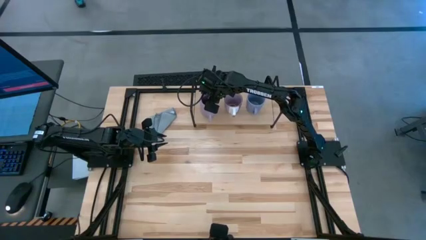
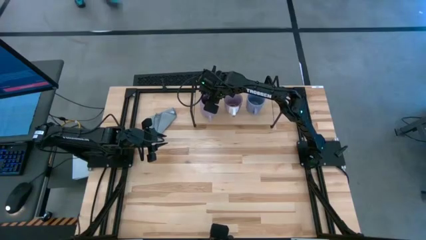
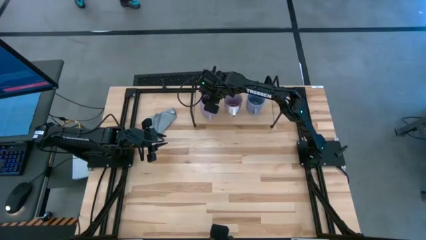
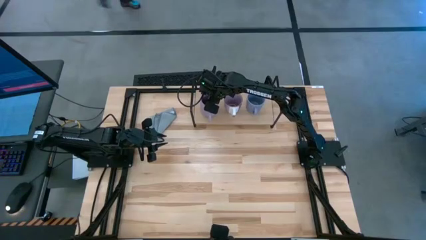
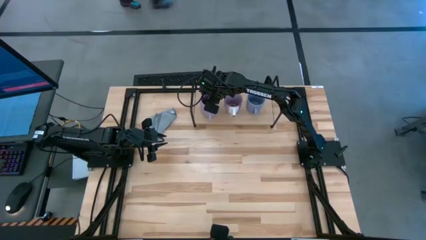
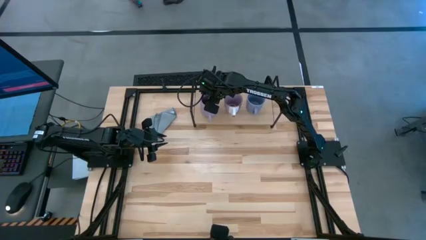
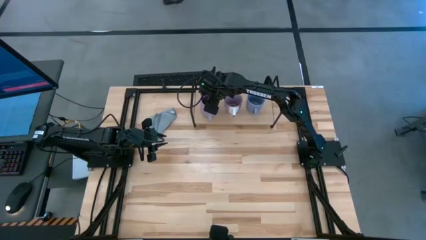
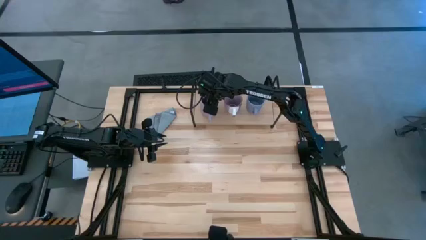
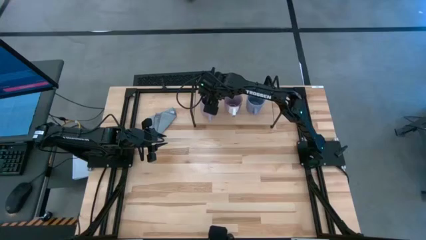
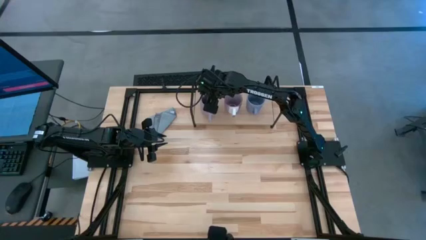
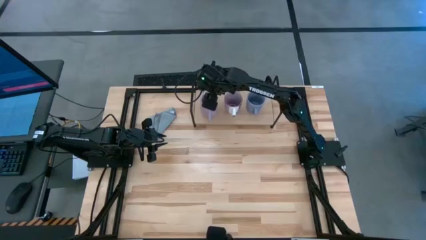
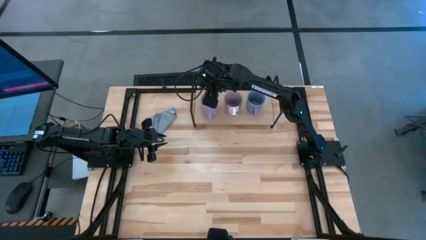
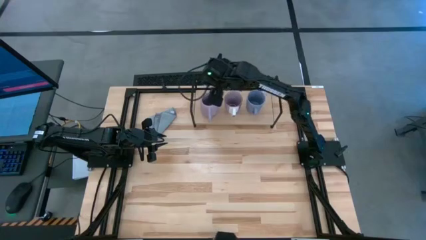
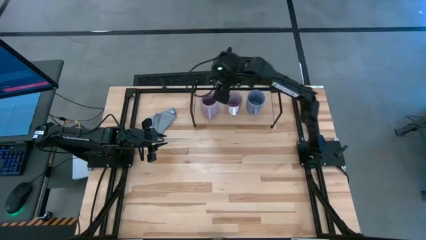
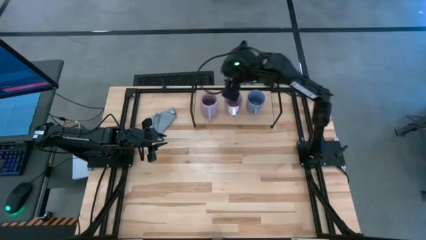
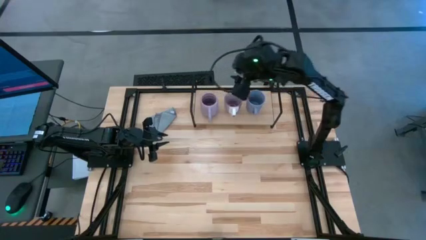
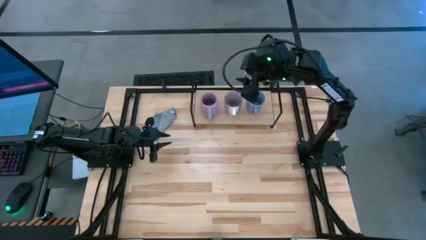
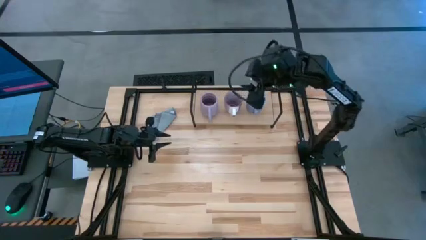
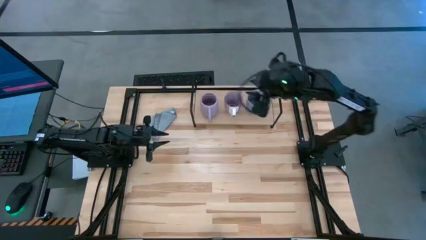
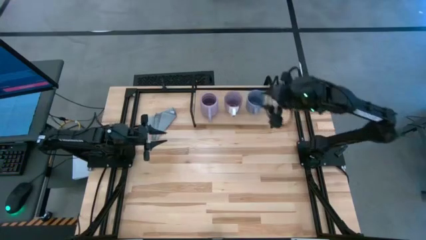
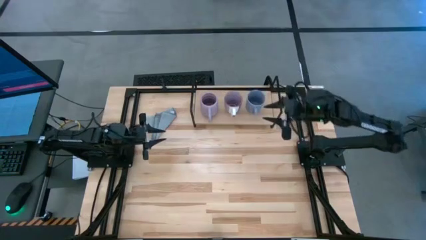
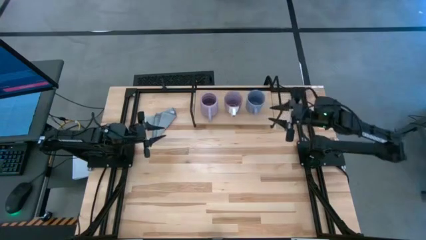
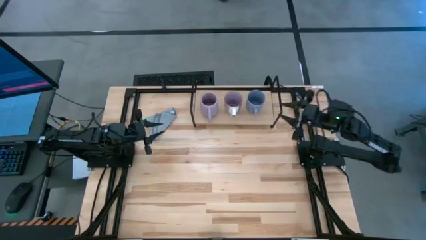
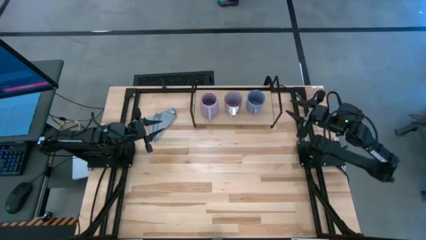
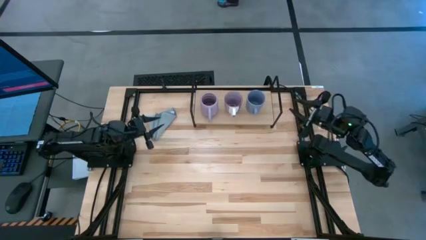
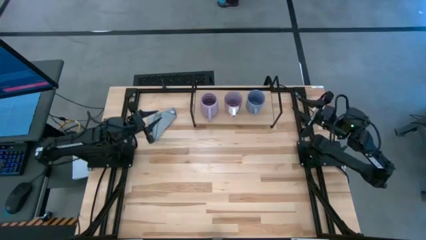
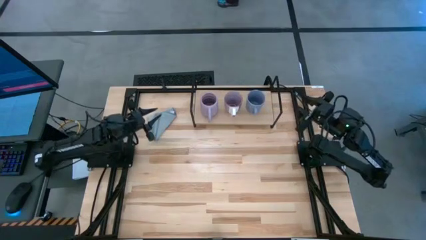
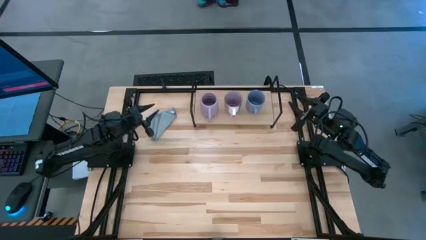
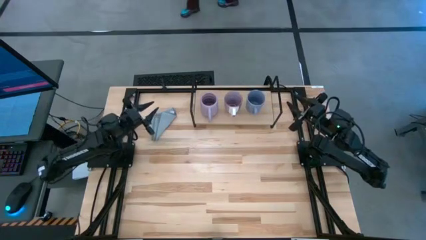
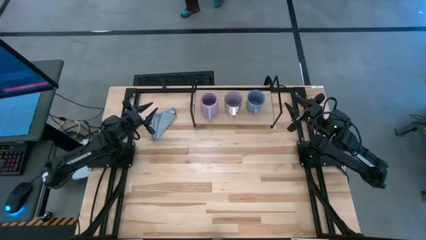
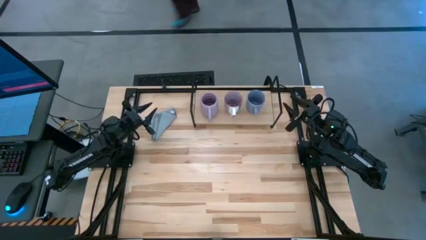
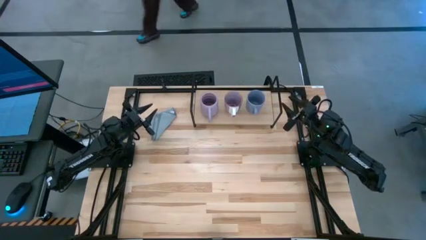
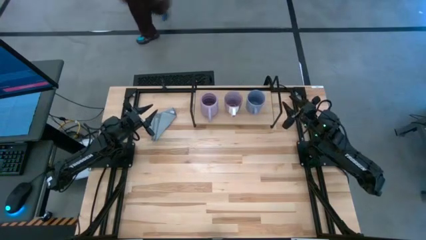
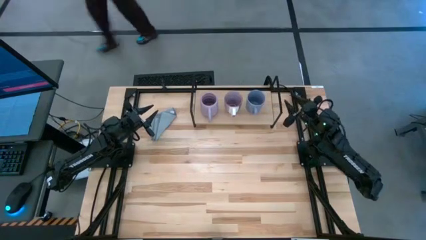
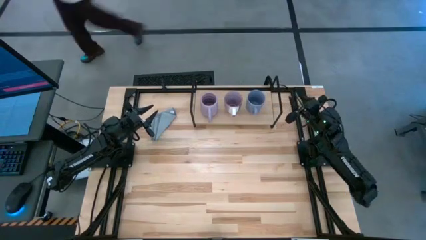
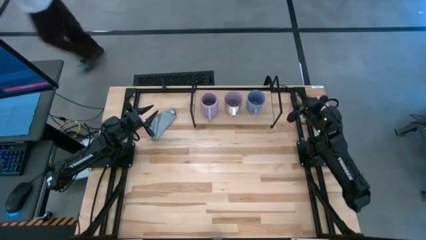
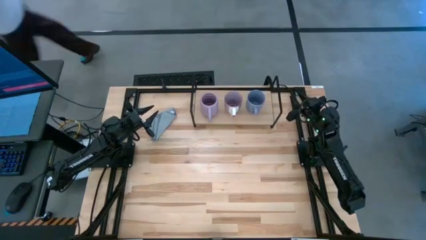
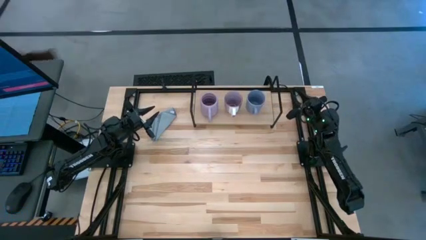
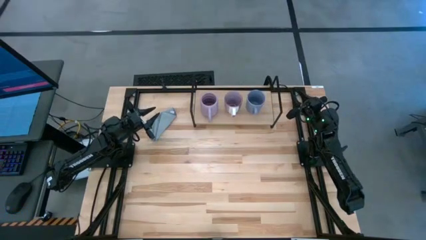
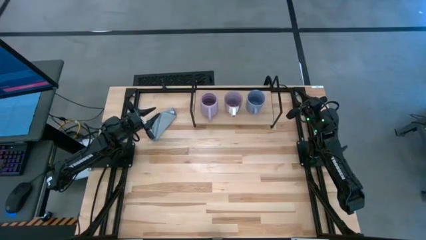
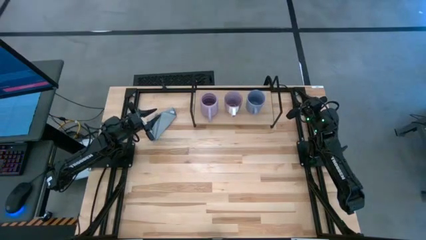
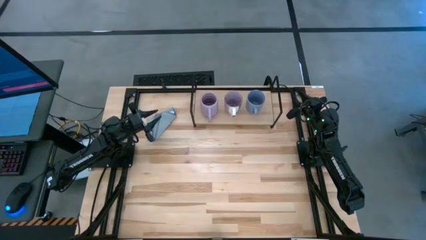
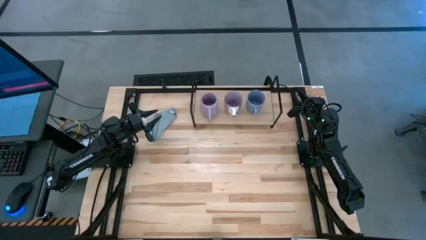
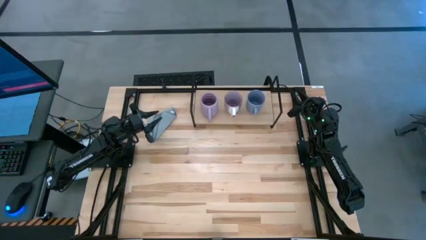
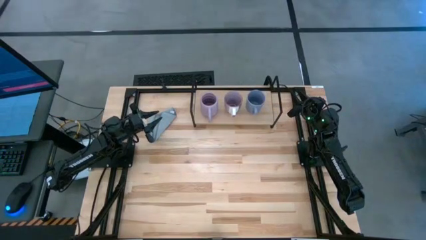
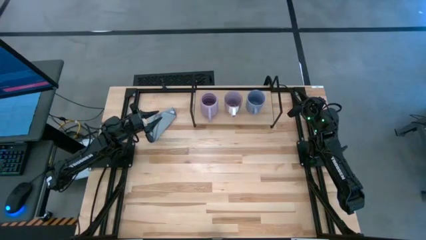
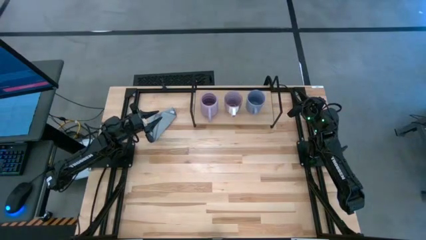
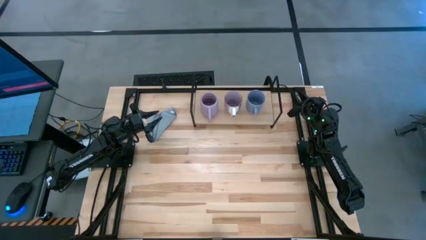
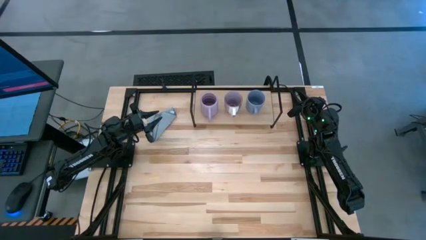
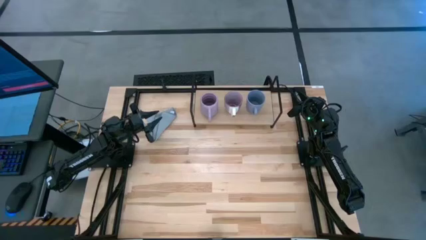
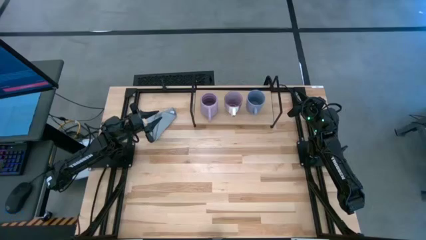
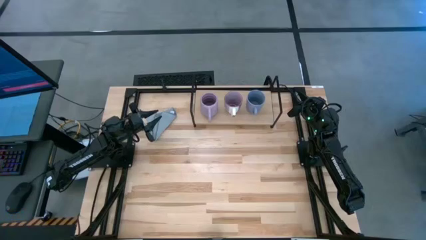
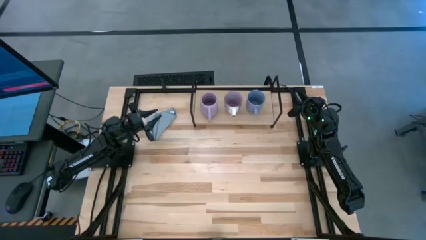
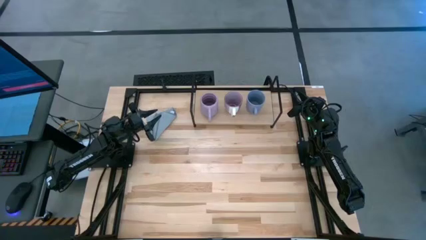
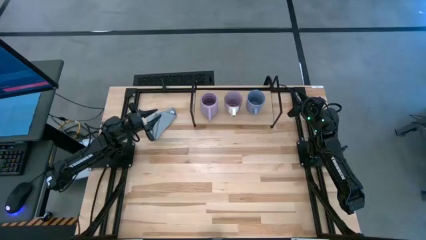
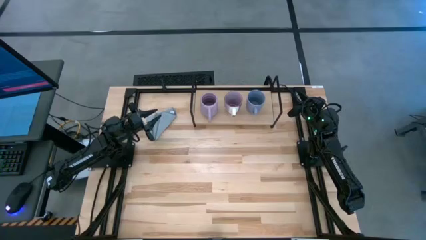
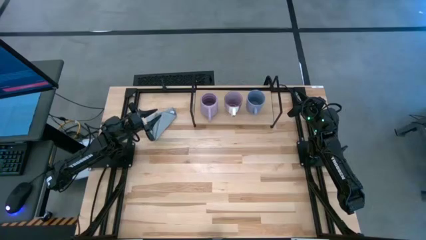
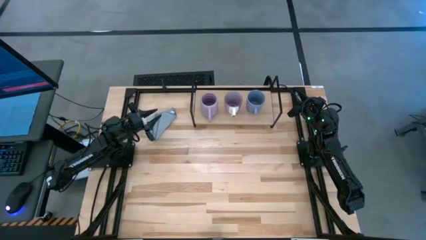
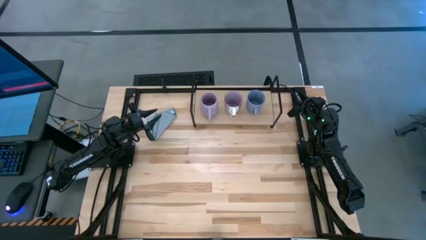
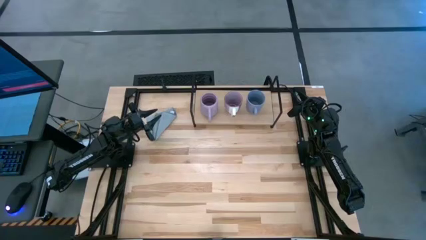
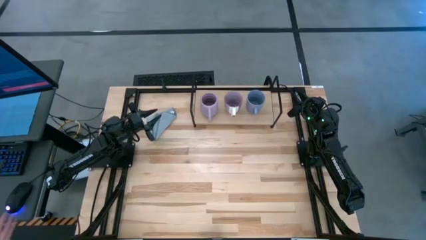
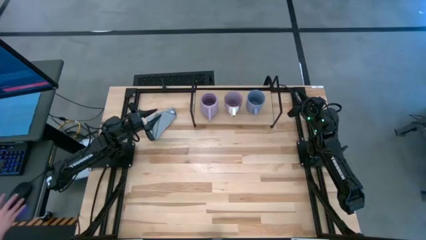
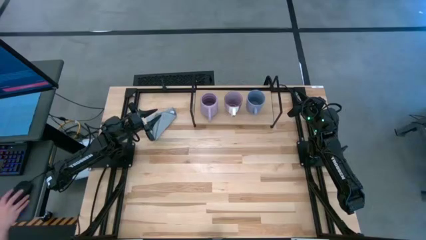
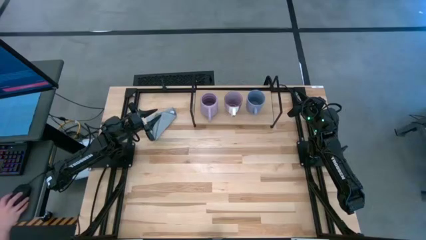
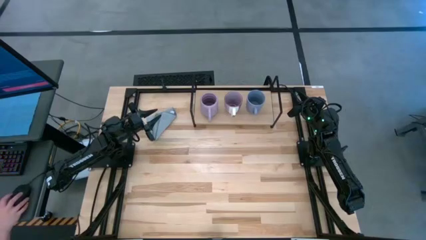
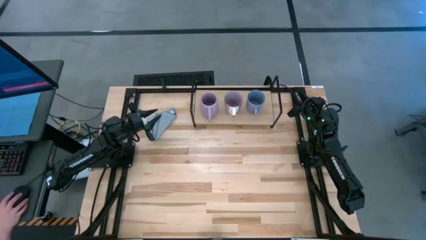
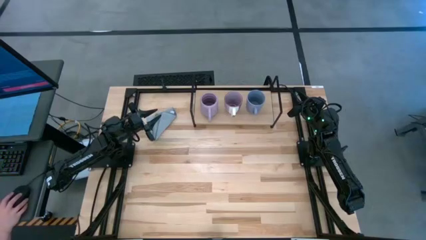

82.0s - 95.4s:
Task: Stack small to large cups/mugs on shelf
Return to Home Position

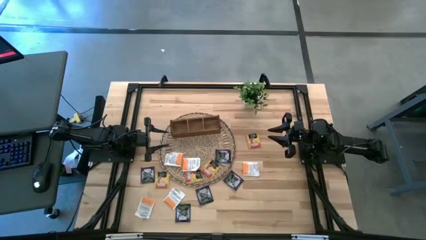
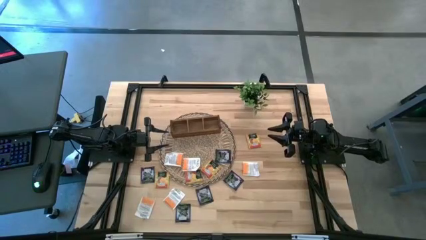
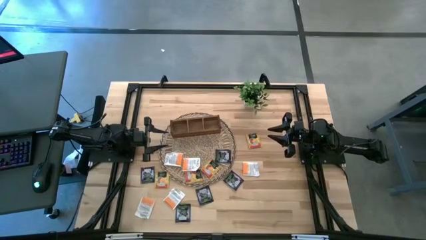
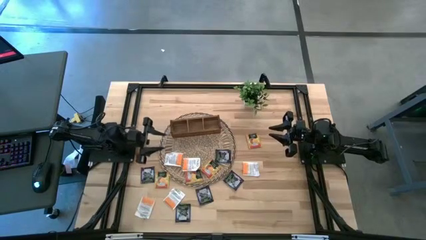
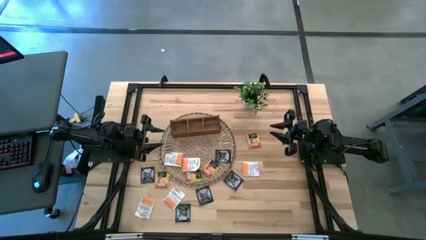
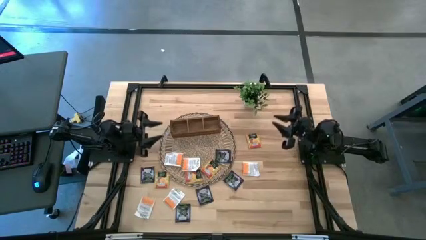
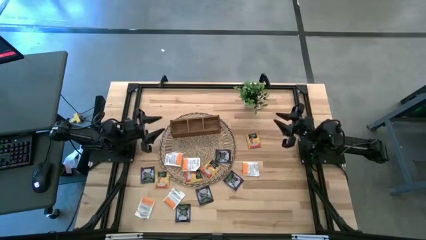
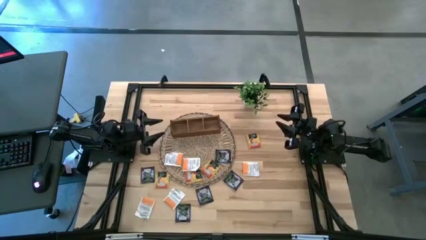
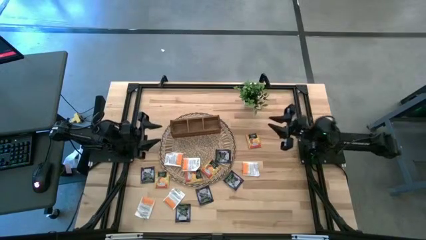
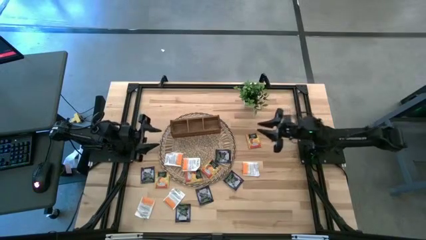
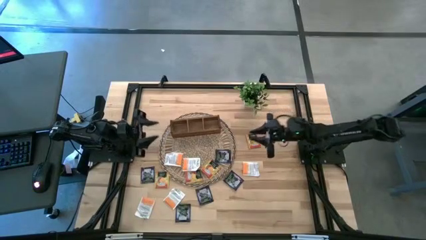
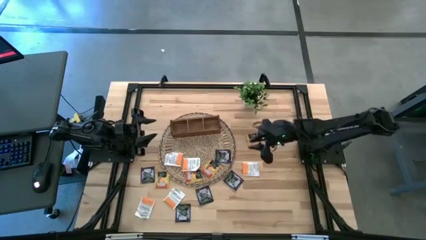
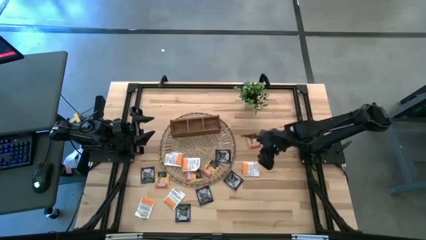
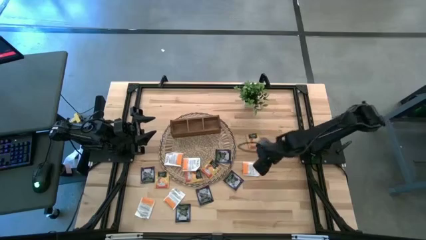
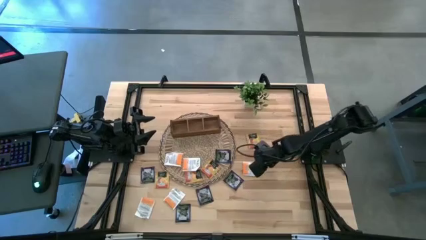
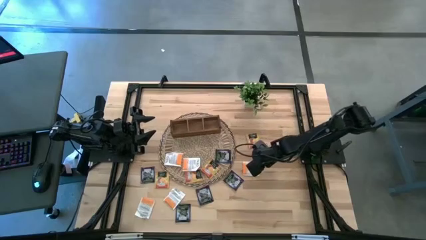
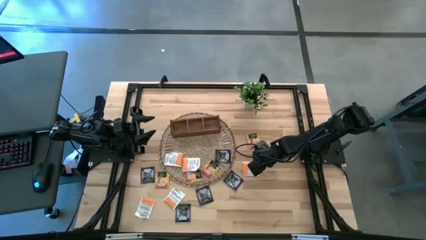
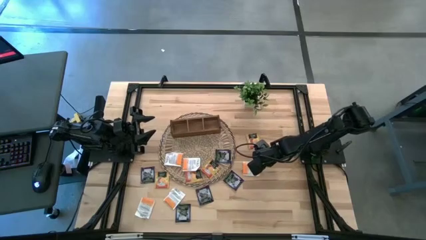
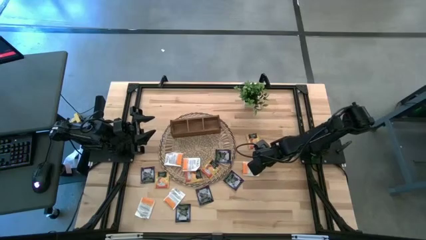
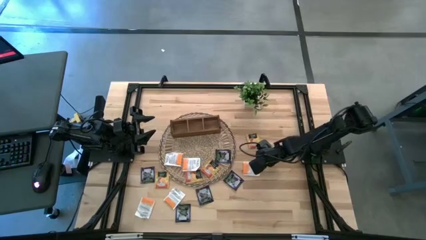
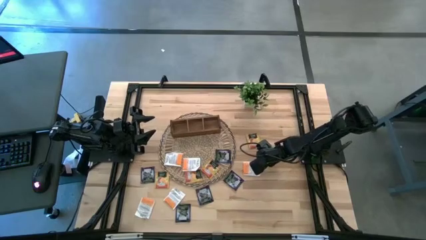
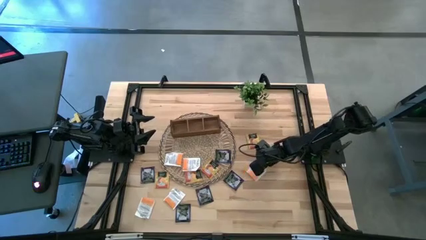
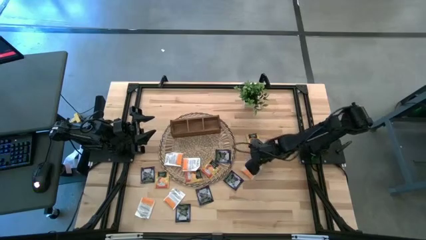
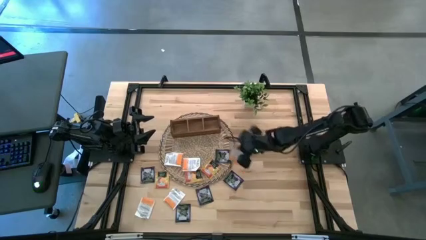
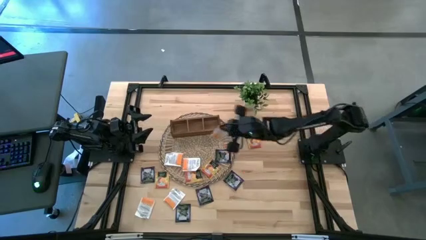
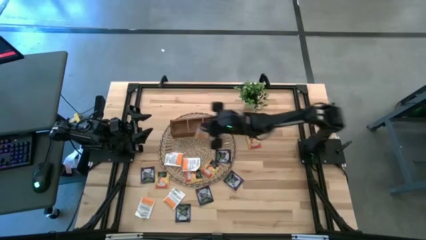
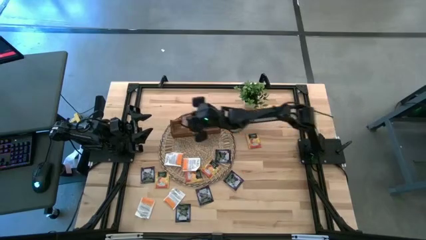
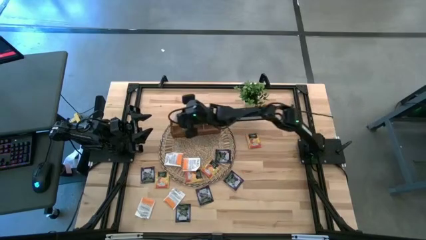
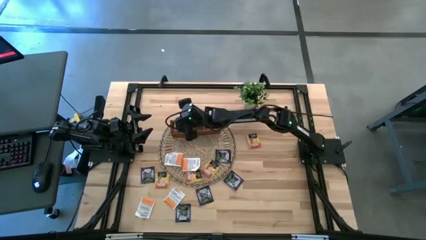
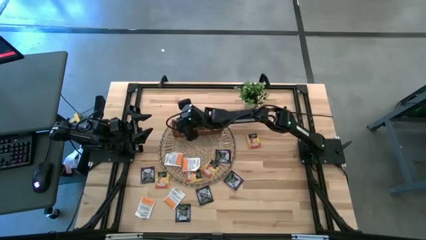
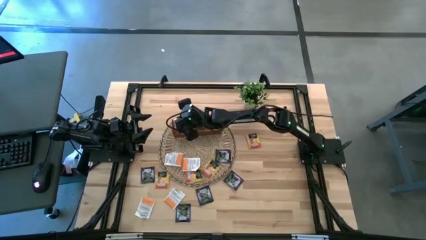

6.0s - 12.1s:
Task: Pick & Place Tea
Put the white tea packet into the left compartment of the wooden organizer
